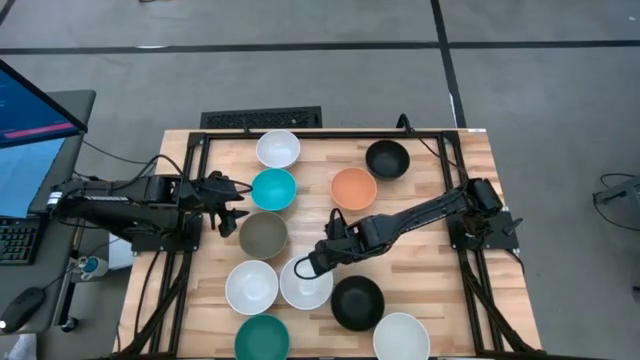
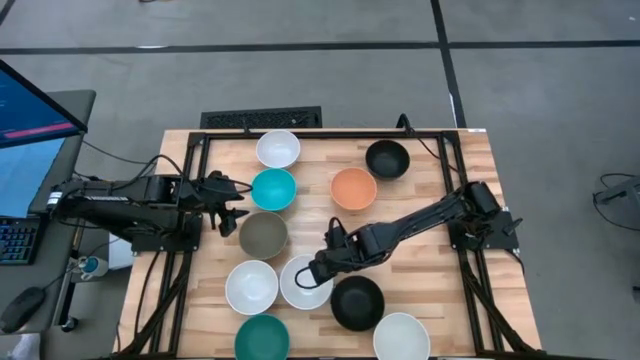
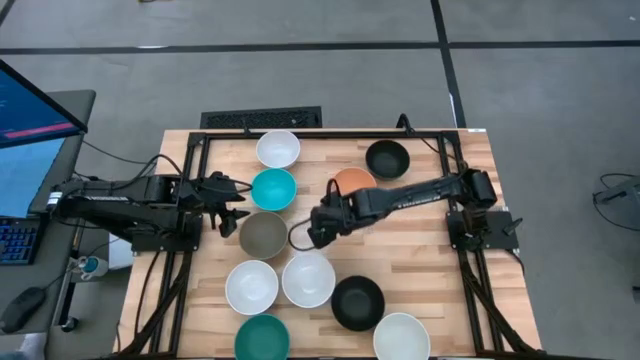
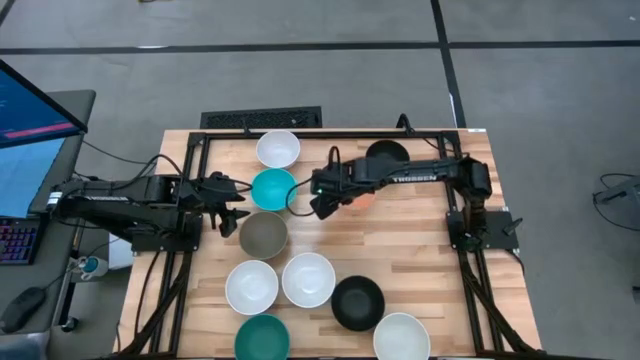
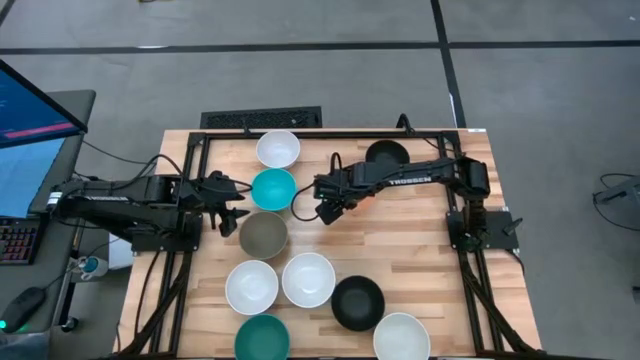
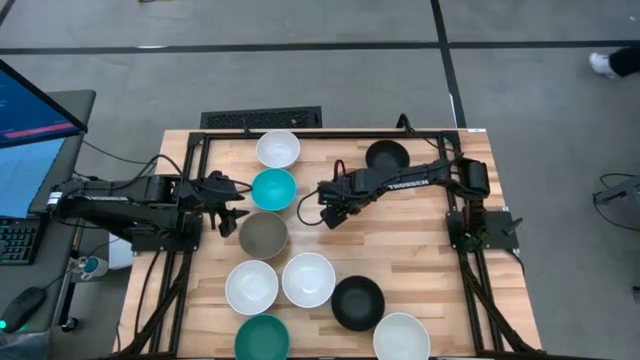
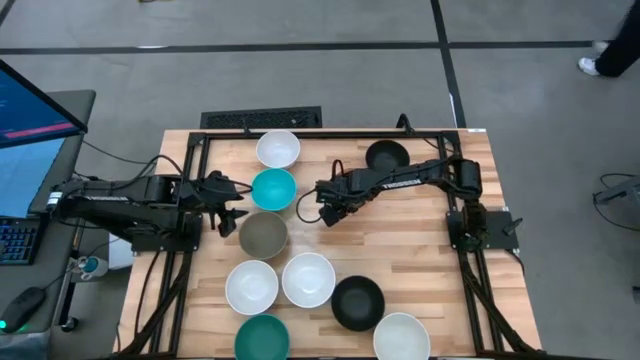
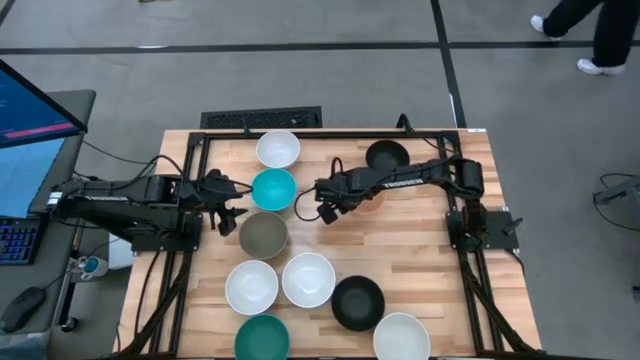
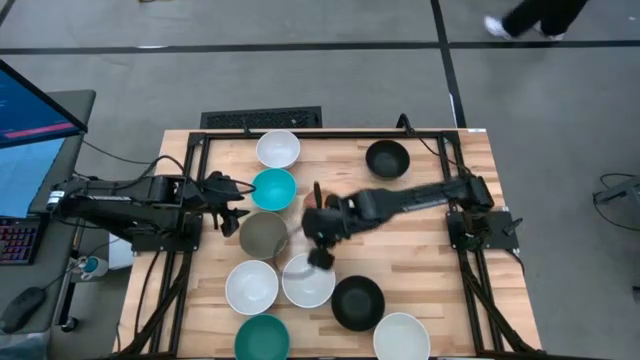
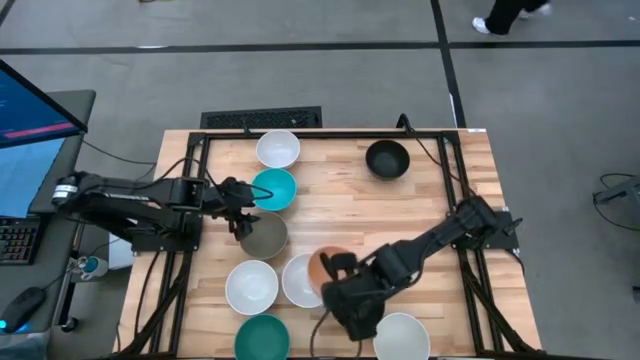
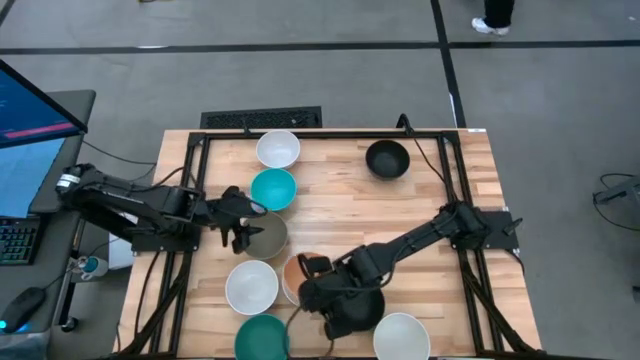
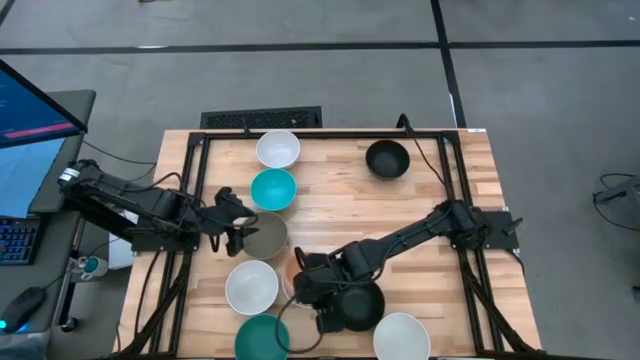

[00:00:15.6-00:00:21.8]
Task: Nest bowls inside each other
Stack the orange bowl on the white bowl

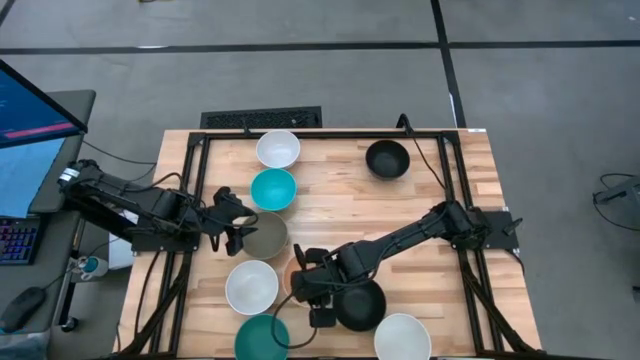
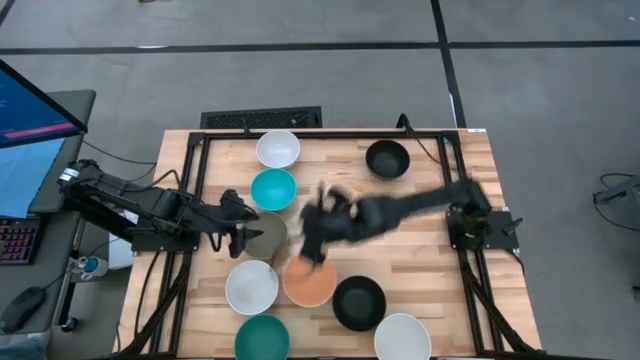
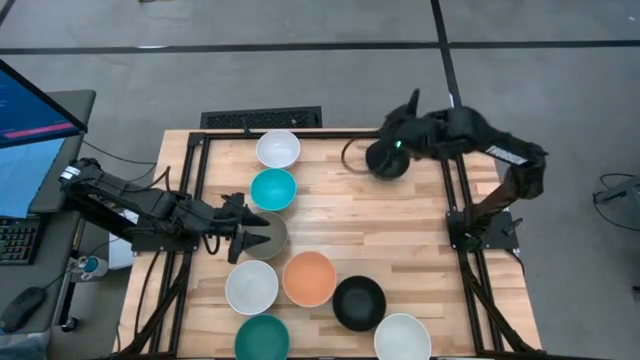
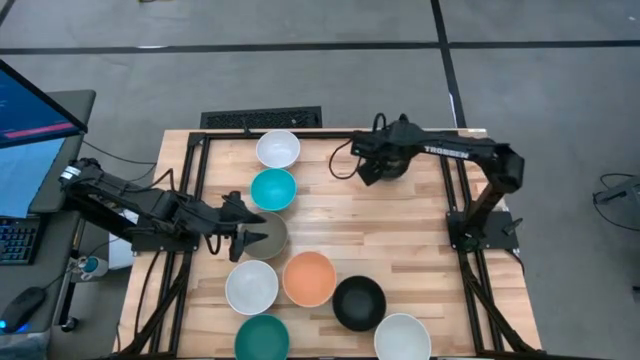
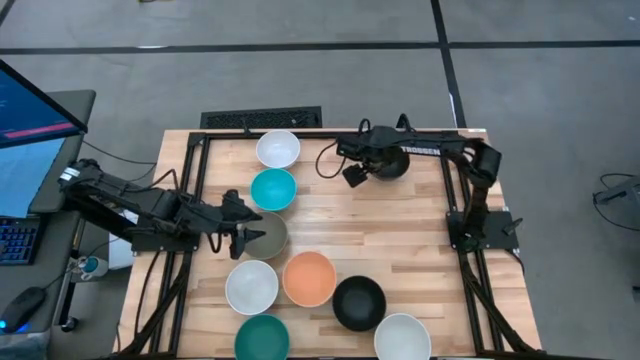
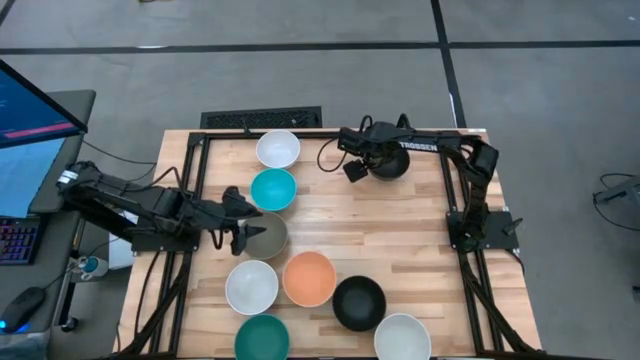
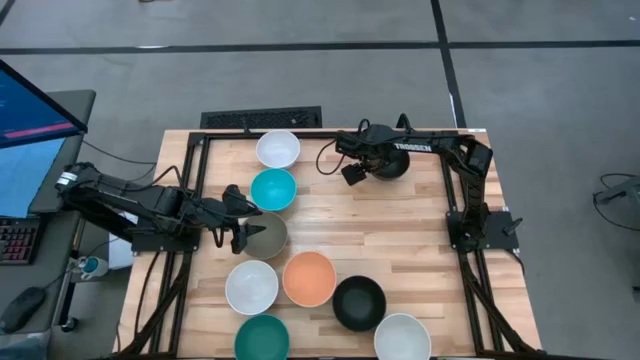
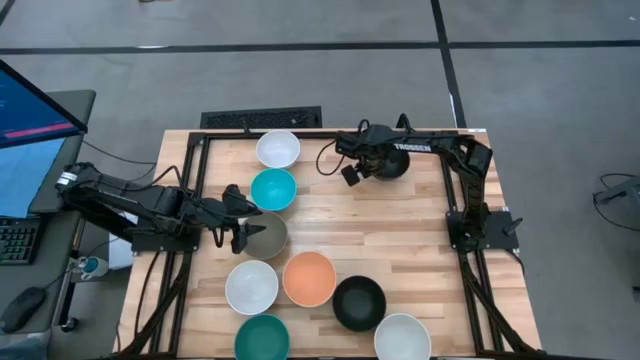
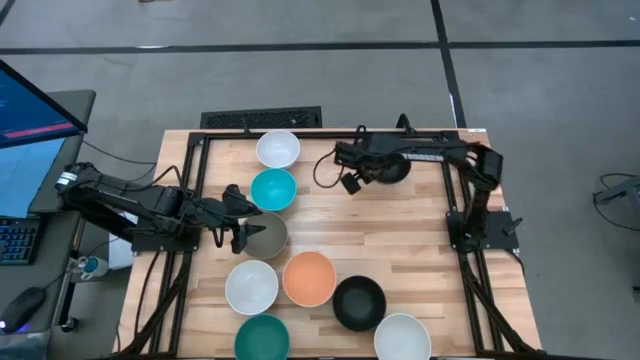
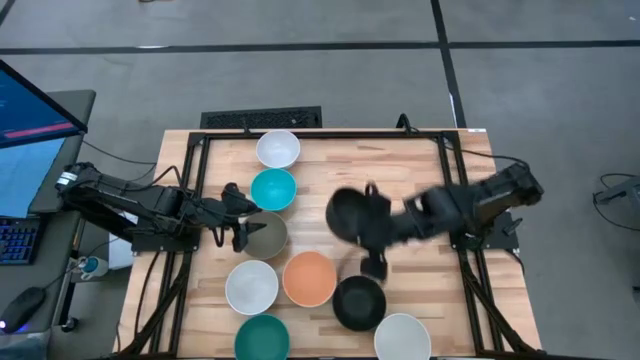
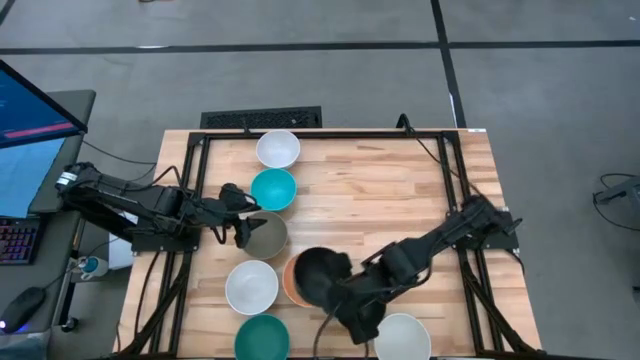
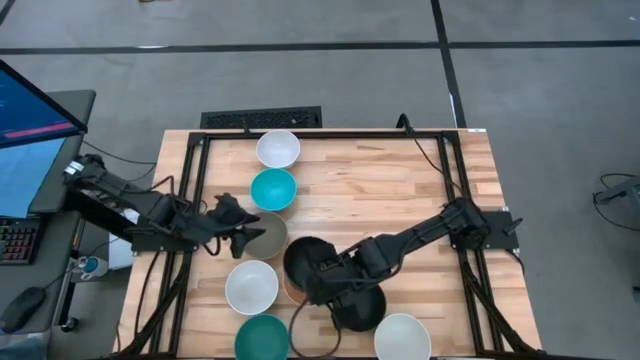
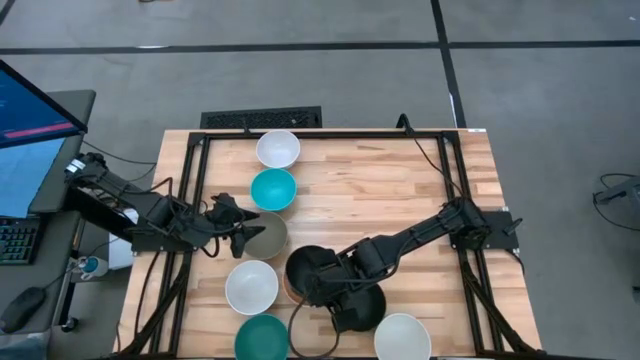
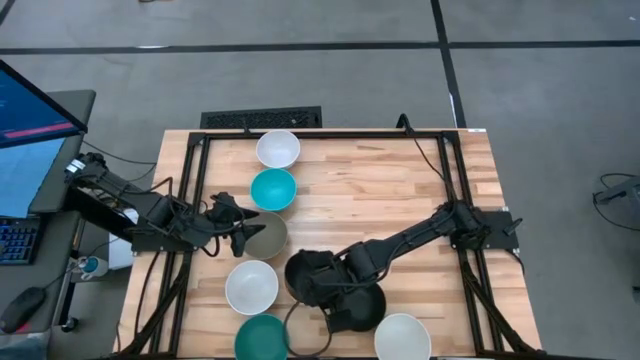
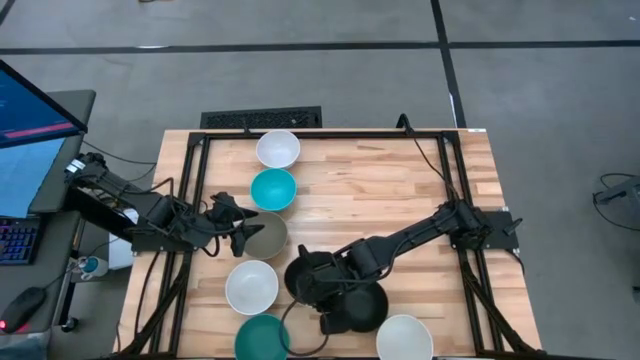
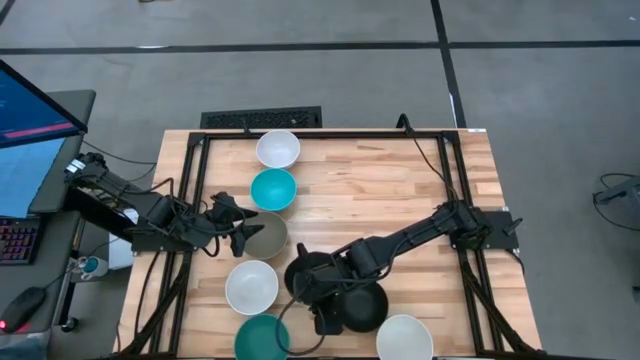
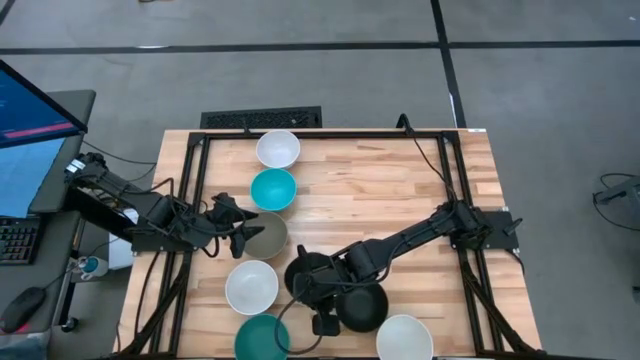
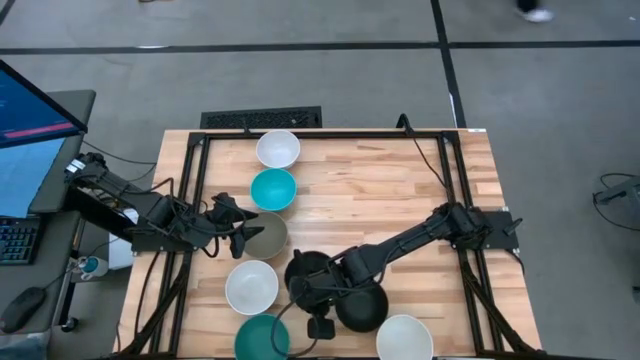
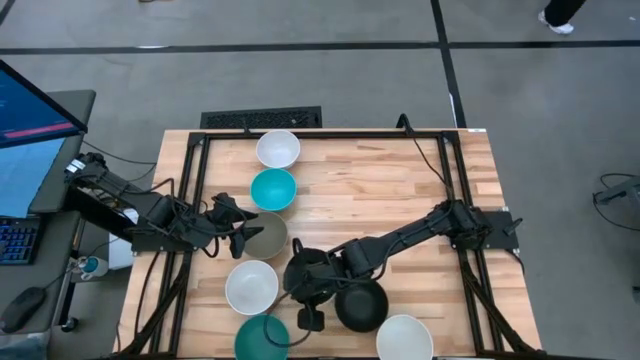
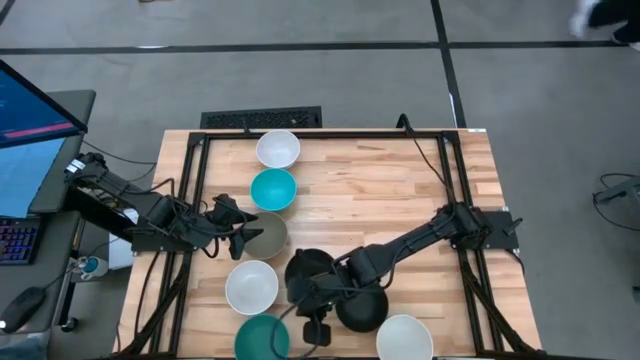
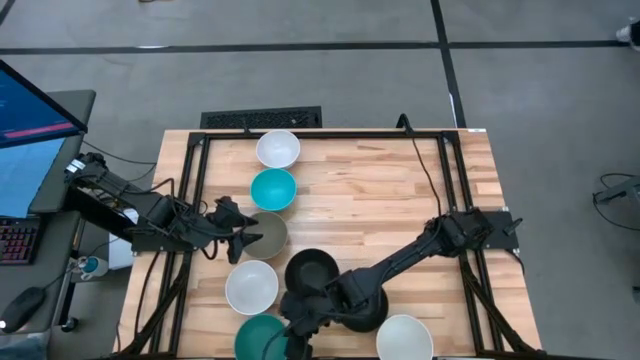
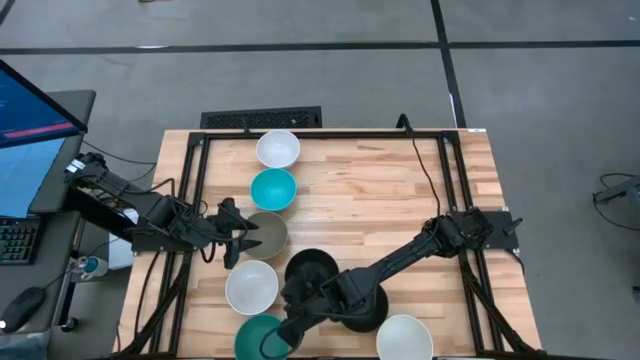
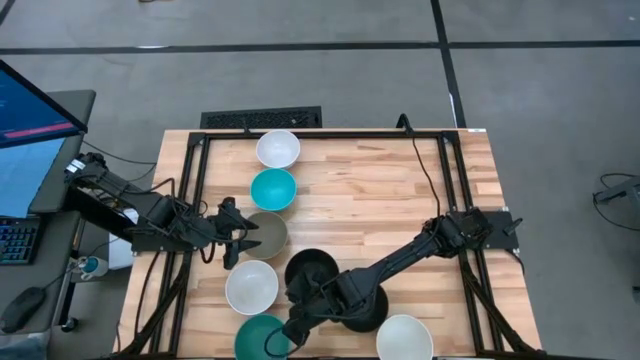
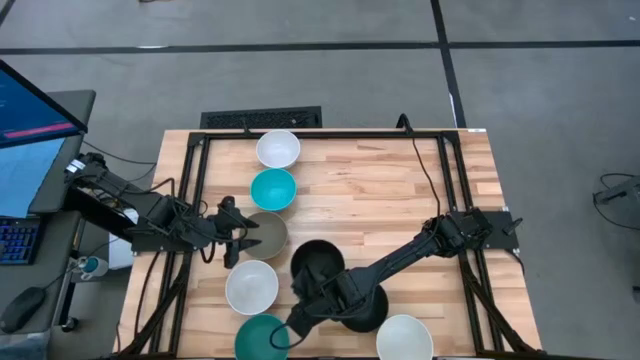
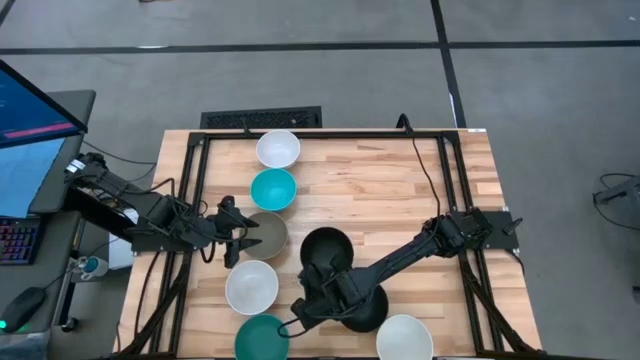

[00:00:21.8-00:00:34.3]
Stack the black bowl on the orange bowl

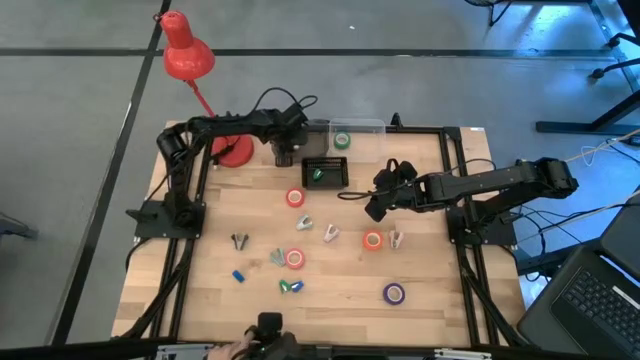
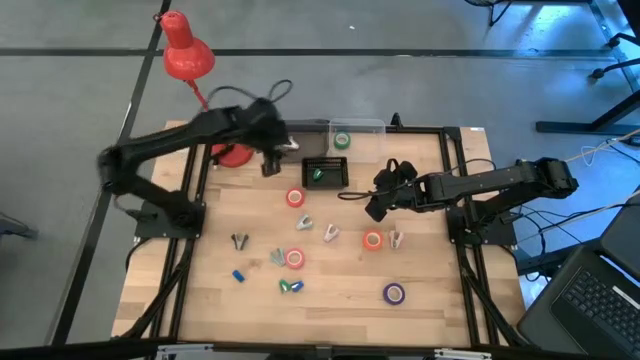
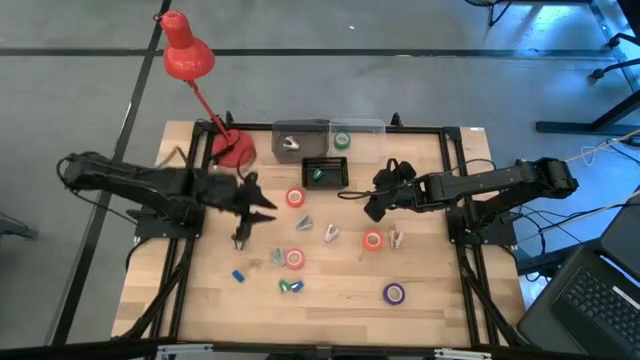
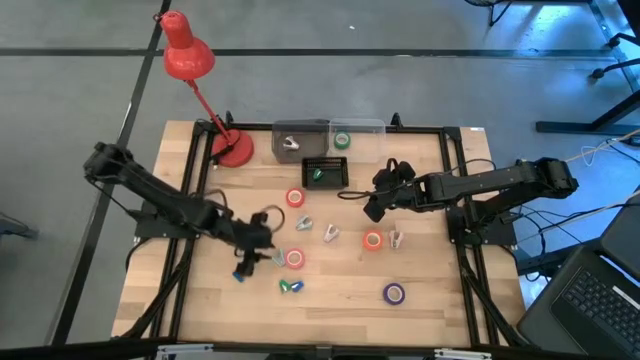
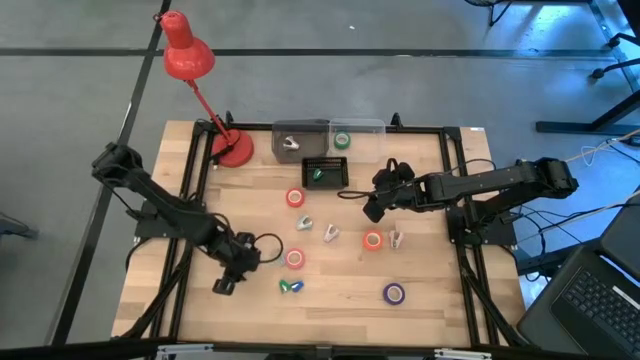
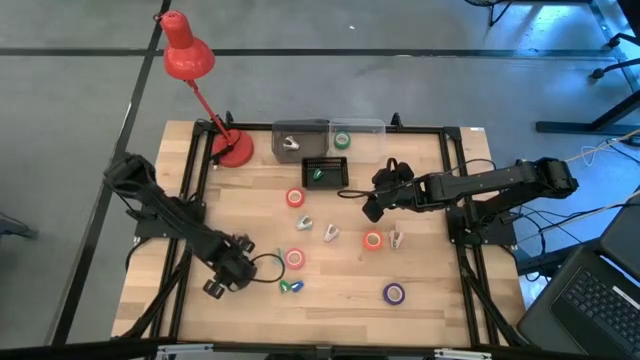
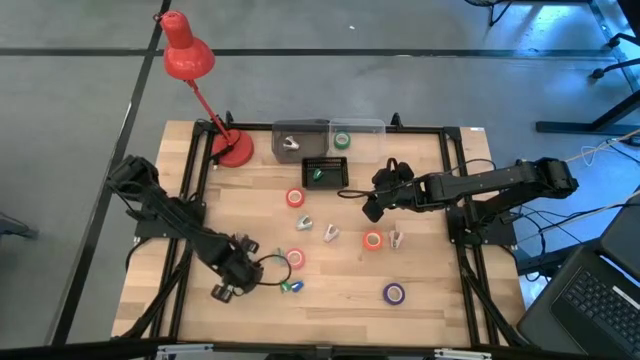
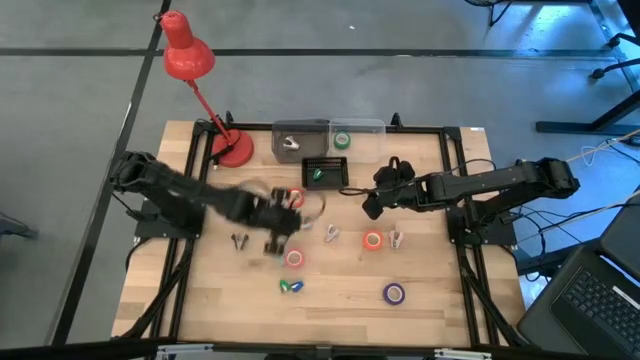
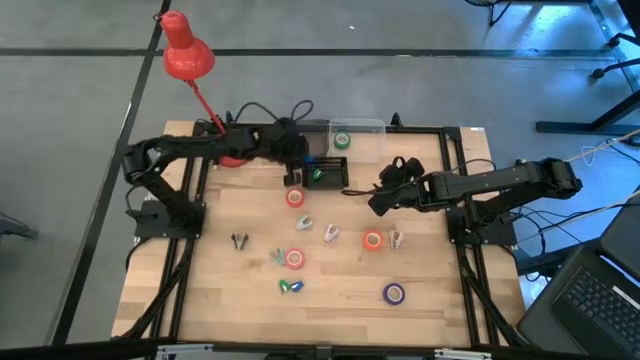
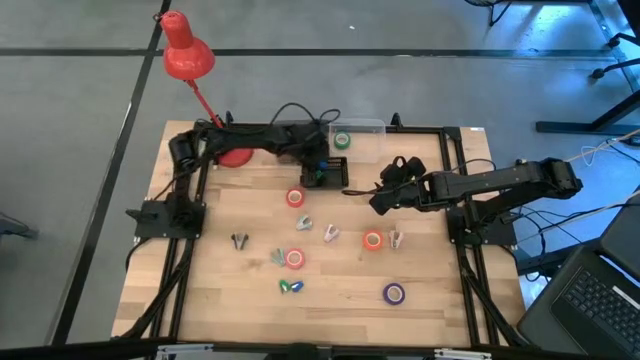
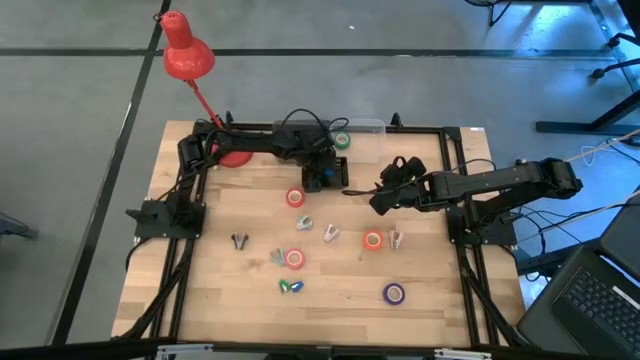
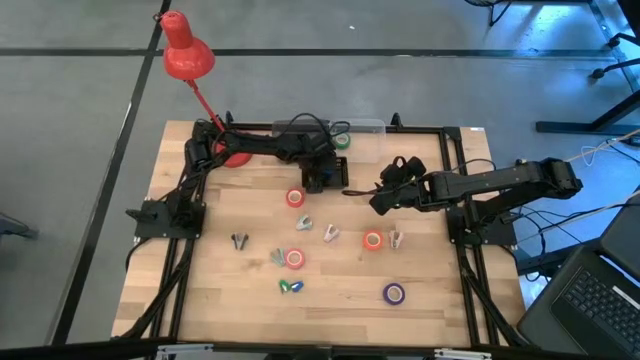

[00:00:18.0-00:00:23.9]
Task: Pick and place Stapler, Stapler remover, tape
Put the left blue stapler into the black bin
